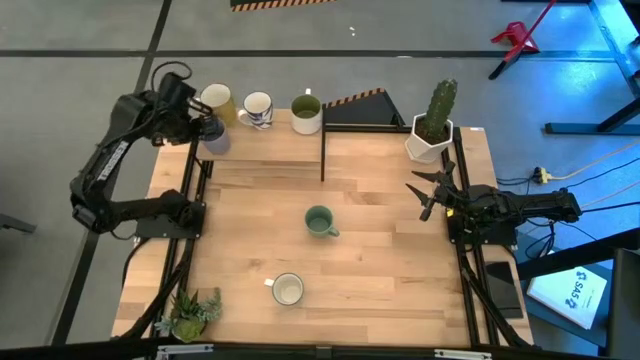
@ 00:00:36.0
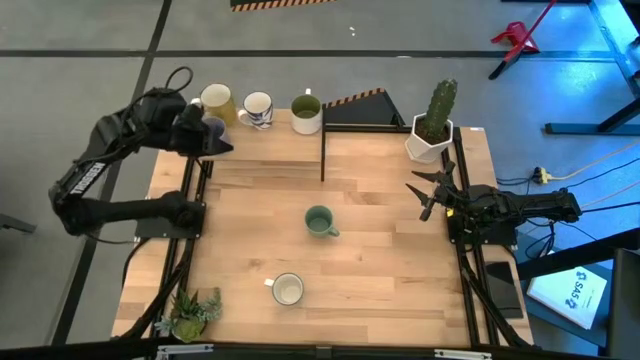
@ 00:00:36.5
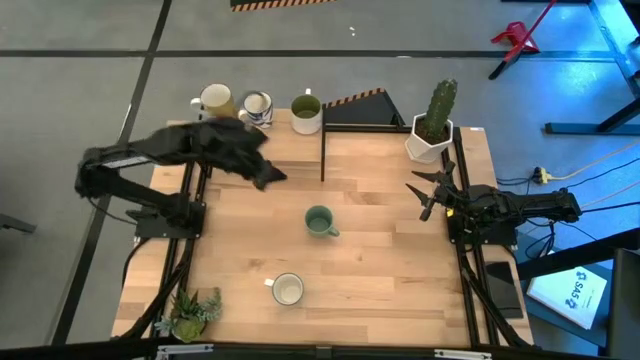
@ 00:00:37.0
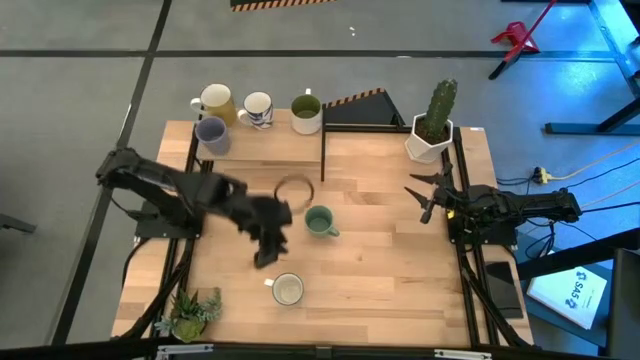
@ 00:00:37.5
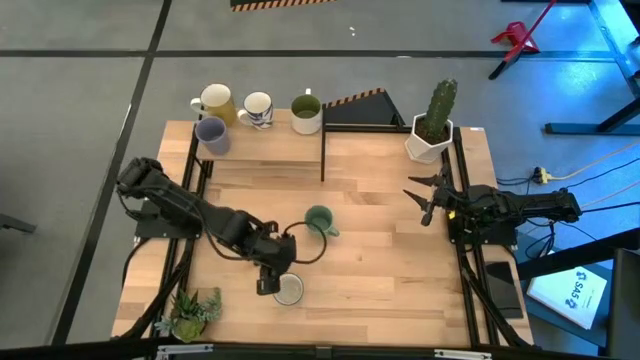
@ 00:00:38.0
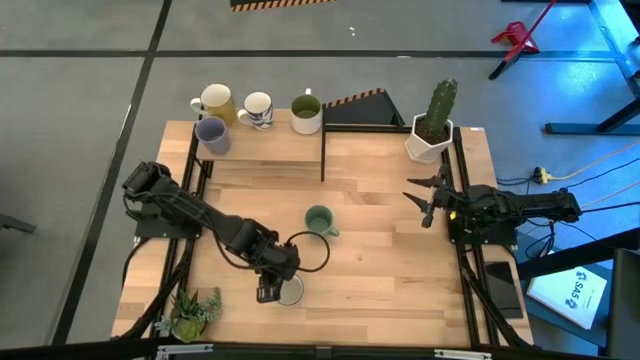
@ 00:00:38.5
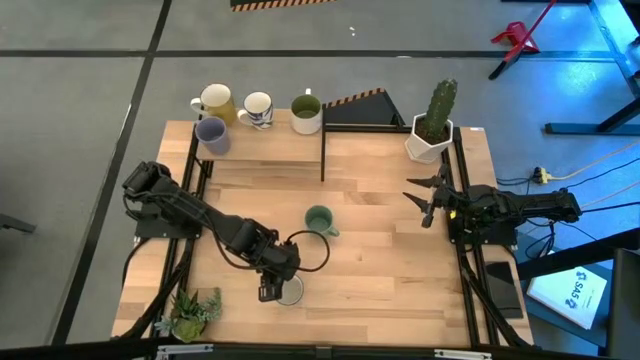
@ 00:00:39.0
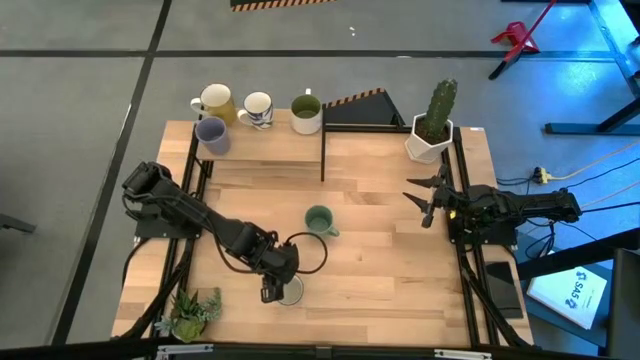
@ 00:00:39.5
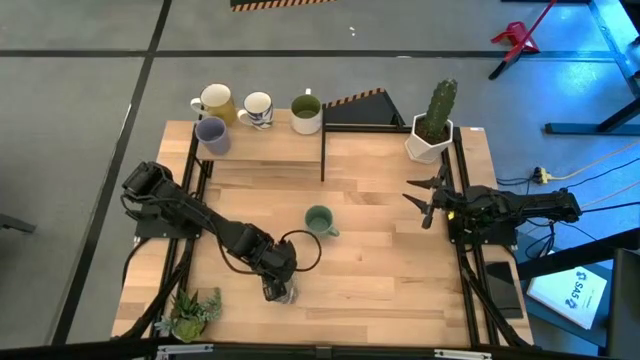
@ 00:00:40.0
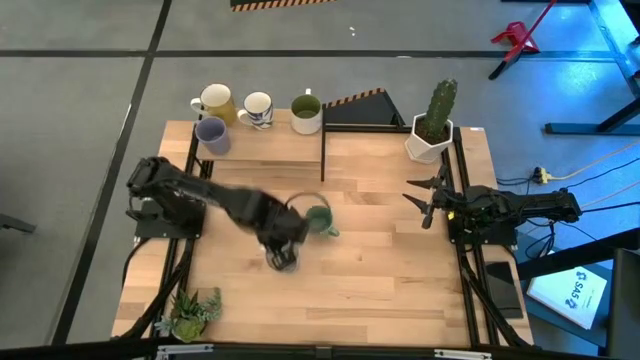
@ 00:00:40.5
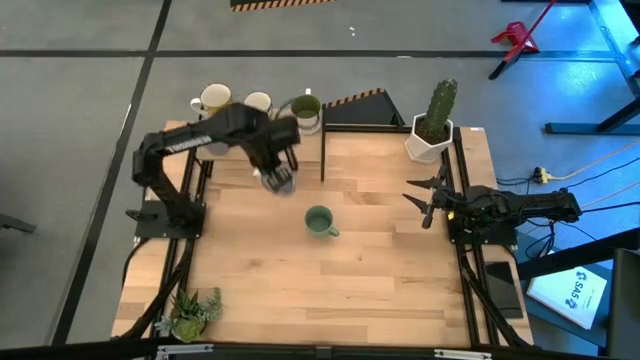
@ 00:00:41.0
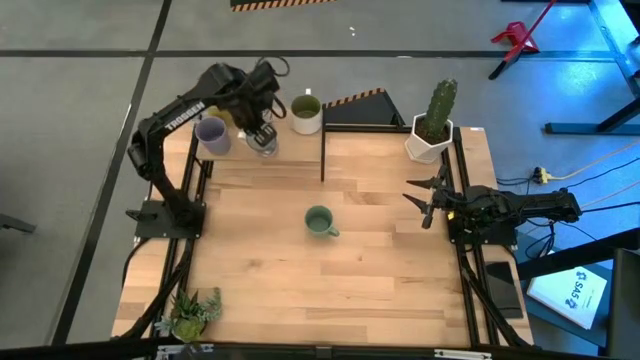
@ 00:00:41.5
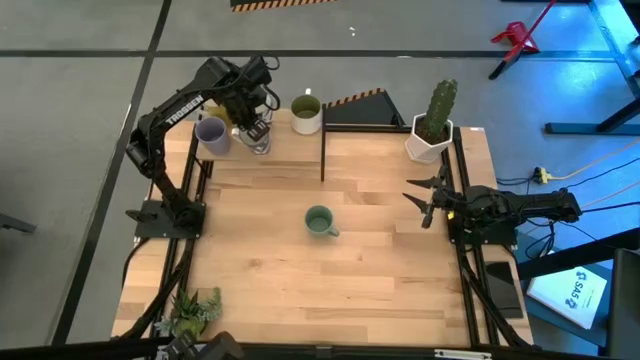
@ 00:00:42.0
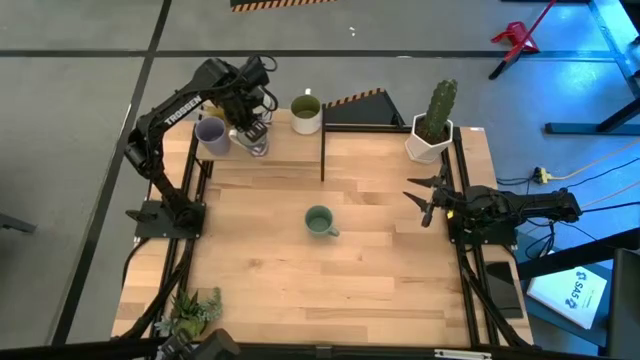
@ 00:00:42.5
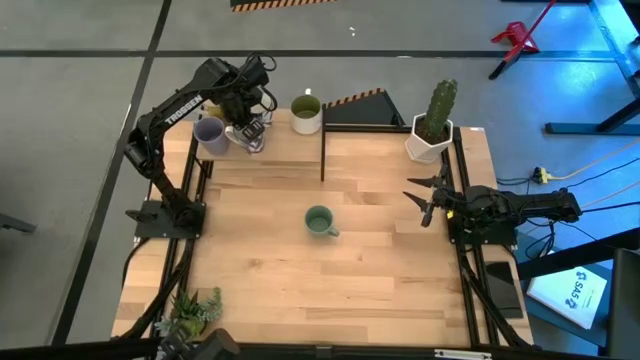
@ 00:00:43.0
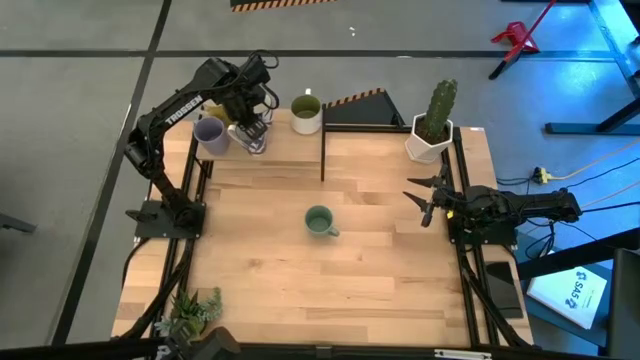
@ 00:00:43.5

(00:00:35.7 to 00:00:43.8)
Task: Place coffee mugs
Align the patterned blue mug with the other patterned blue mug on the shelf

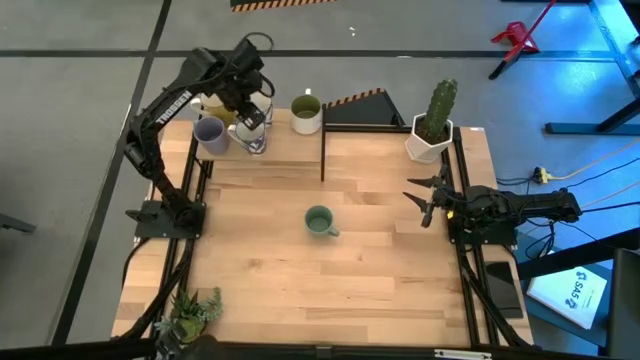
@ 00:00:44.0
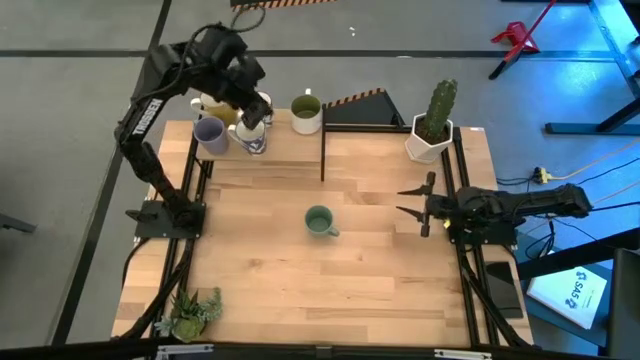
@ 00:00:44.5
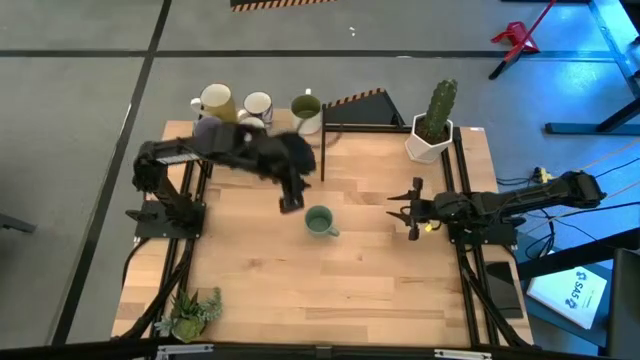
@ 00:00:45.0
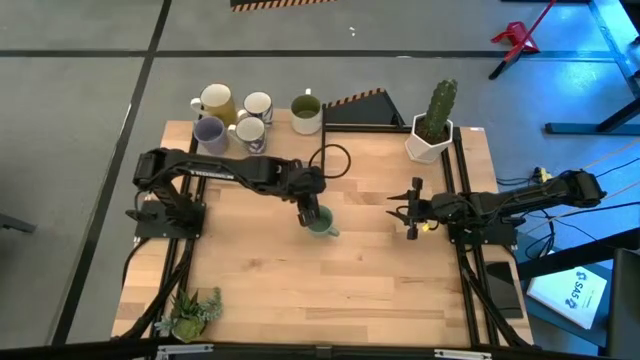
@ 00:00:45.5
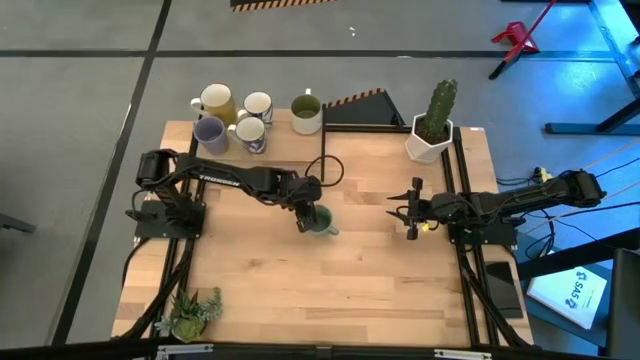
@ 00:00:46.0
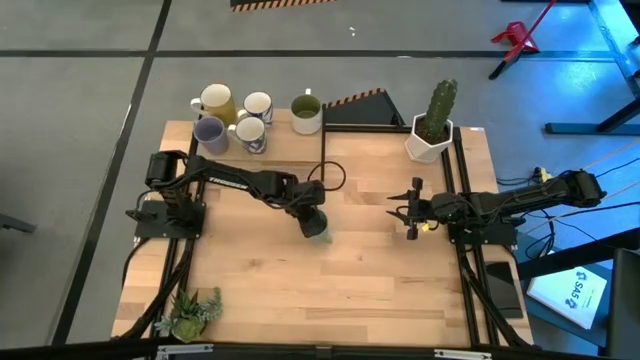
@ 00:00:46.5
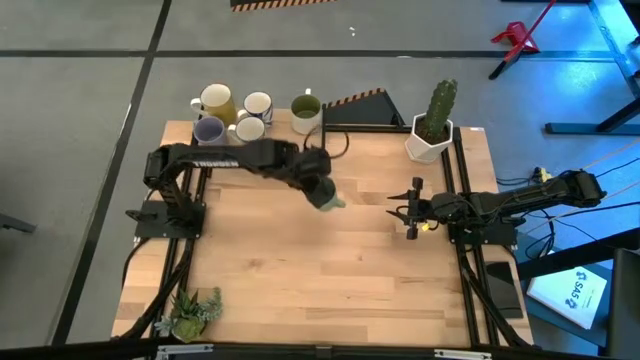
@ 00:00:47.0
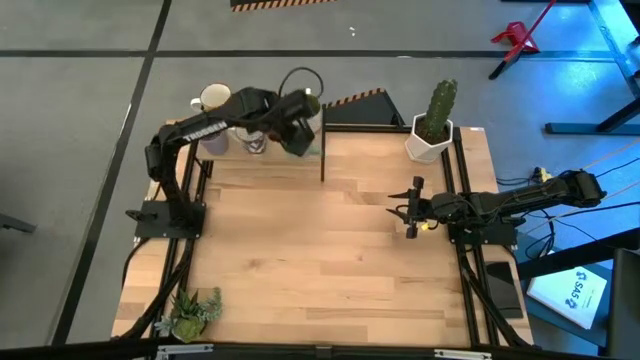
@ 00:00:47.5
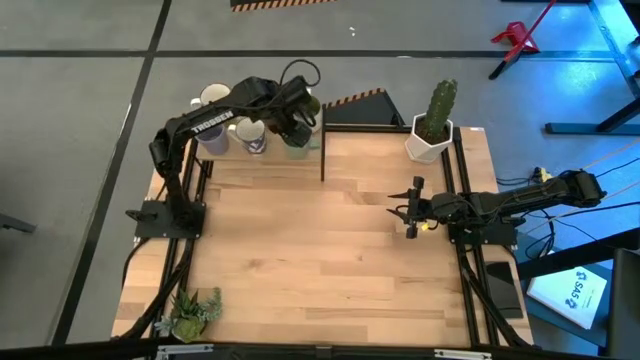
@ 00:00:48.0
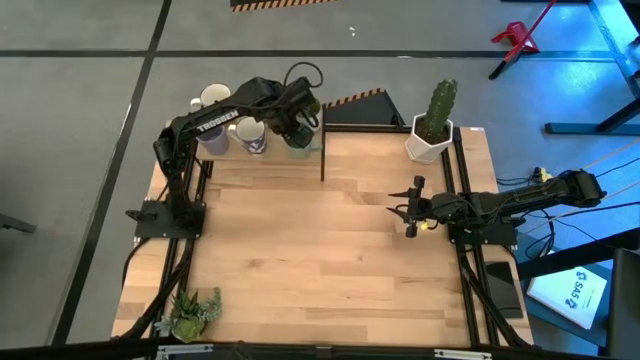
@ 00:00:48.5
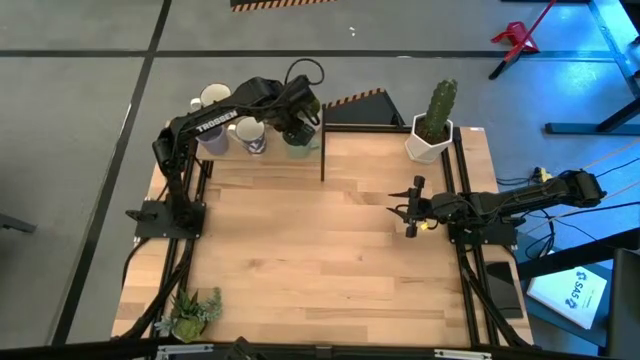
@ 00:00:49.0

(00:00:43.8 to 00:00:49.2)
Put the light green mug on the shelf

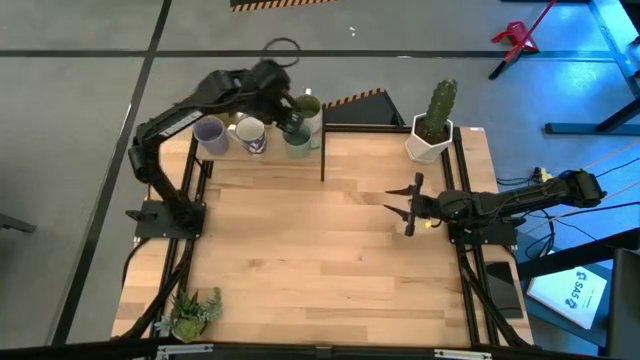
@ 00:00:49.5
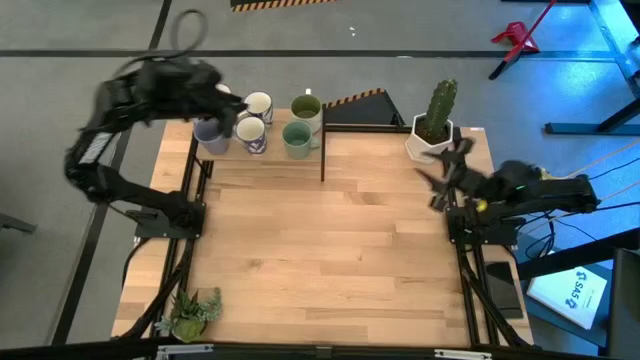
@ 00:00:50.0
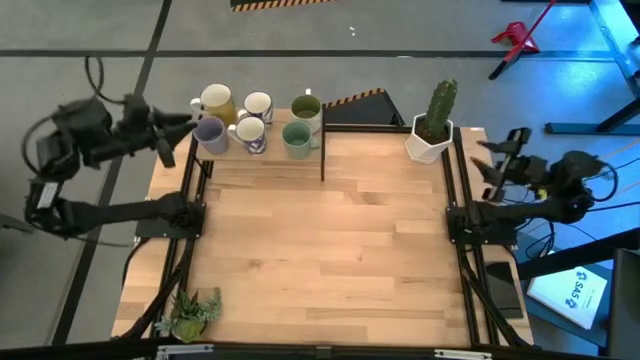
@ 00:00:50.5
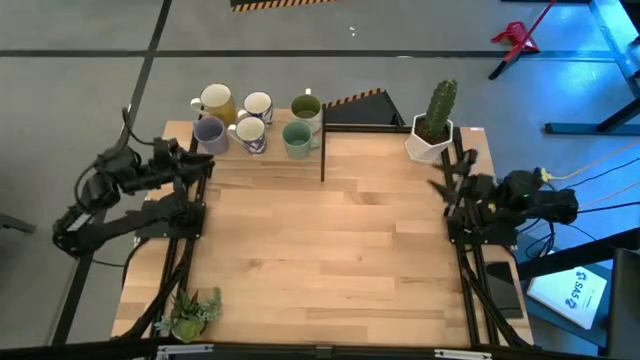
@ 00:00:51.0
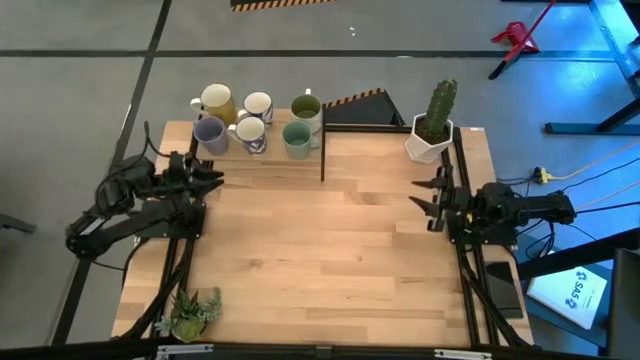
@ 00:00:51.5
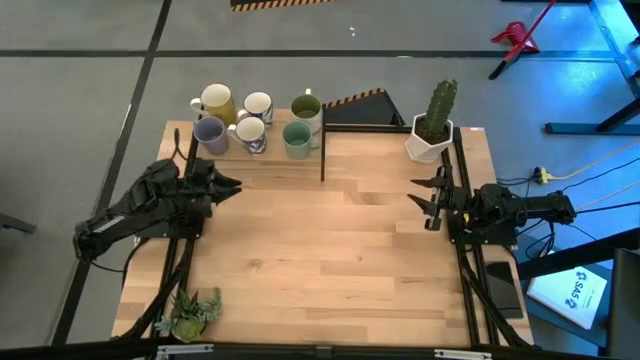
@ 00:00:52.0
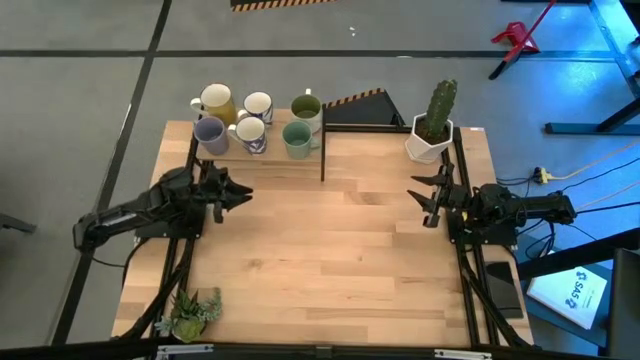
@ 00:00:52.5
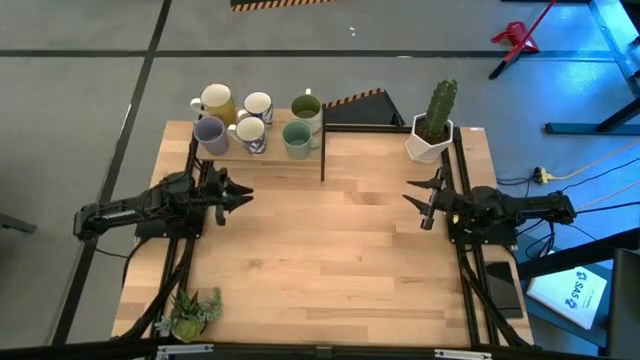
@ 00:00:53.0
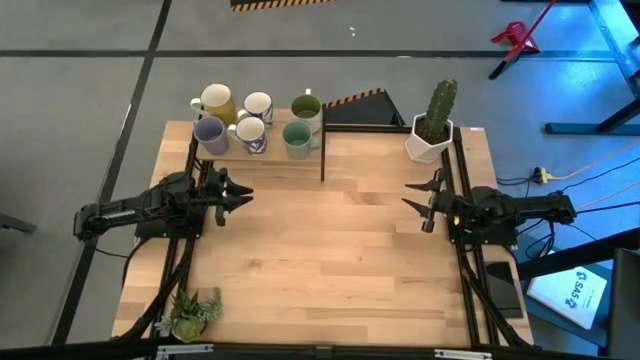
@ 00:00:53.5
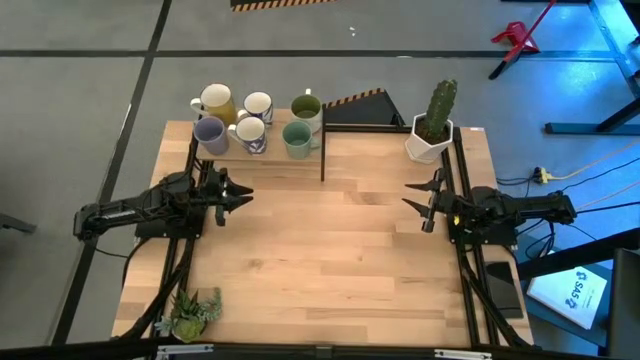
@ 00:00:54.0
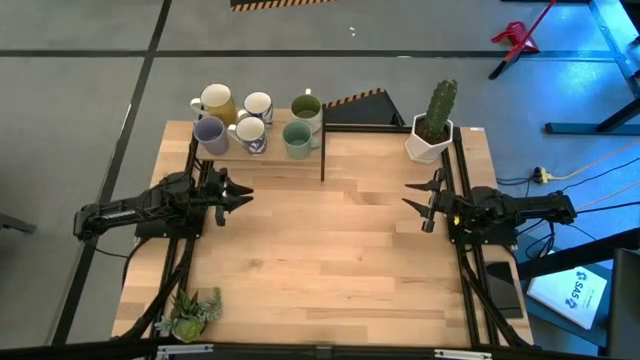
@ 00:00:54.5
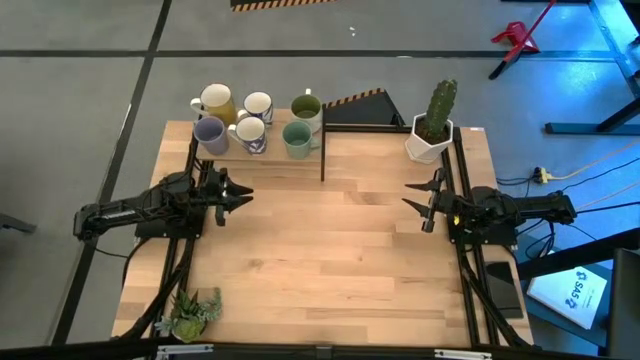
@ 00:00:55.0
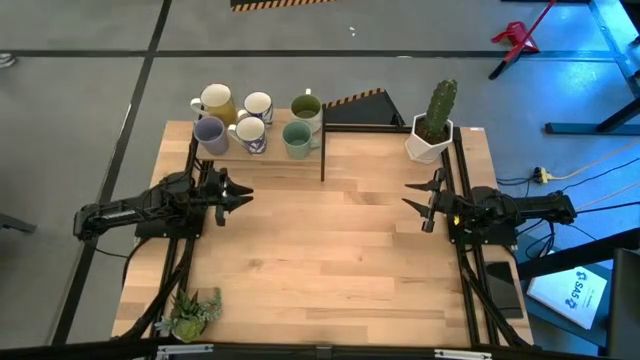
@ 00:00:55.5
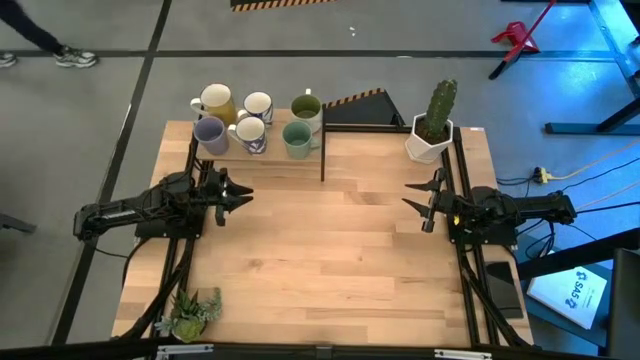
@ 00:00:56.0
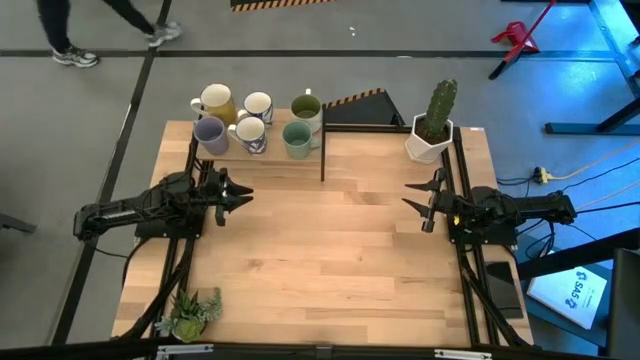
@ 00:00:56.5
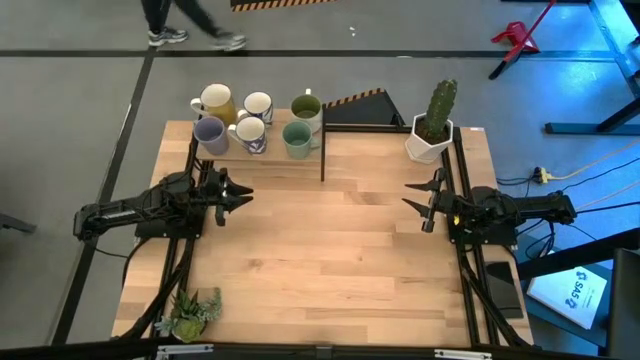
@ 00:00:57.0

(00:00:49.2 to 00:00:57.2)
Return to Home Position

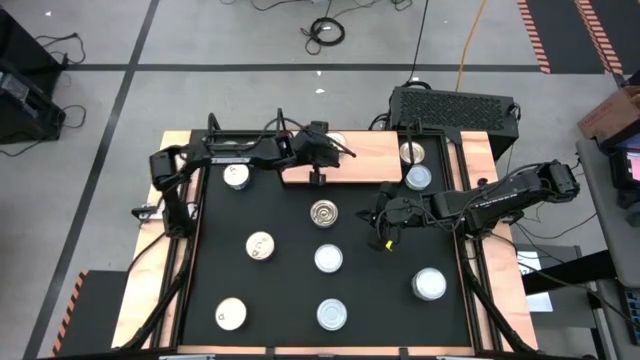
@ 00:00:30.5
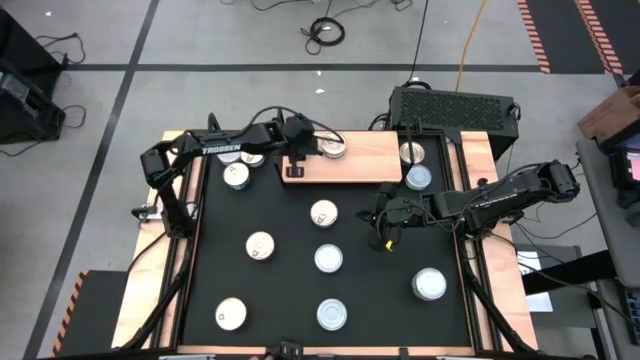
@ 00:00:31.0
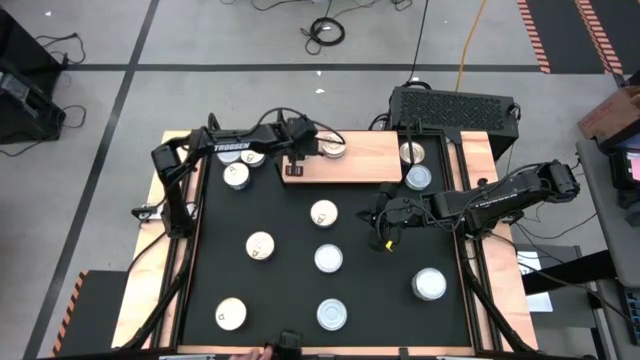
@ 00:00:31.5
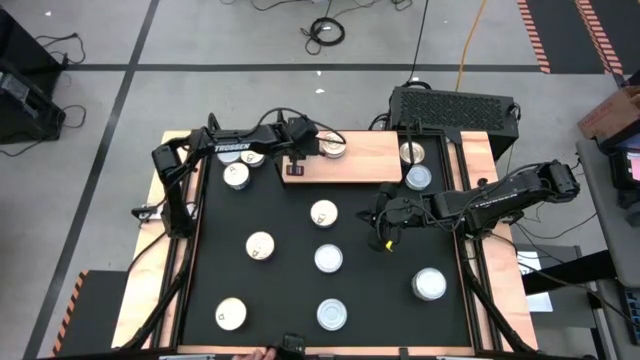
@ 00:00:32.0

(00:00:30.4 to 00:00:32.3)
Task: Stack canned seafood by type on shelf
Adjust the green tuna can on the shelf
